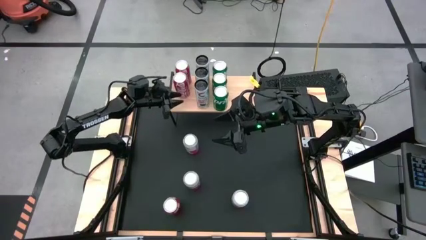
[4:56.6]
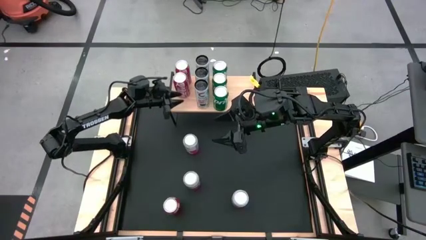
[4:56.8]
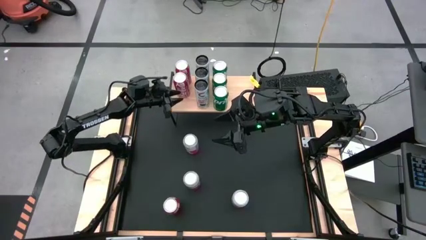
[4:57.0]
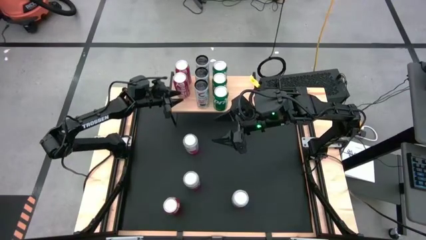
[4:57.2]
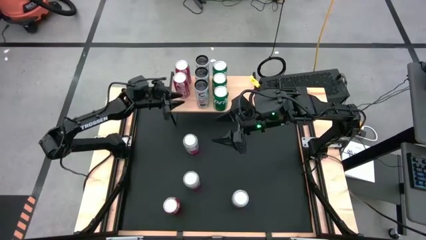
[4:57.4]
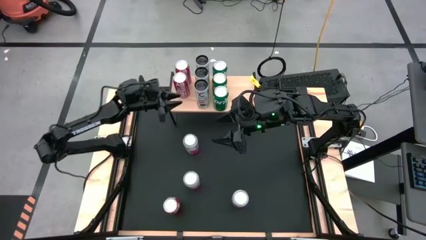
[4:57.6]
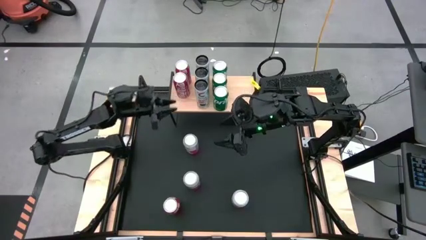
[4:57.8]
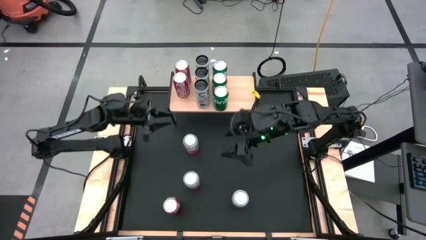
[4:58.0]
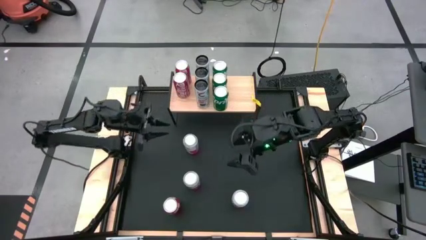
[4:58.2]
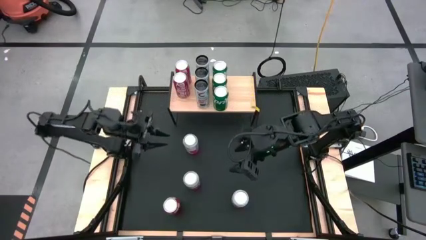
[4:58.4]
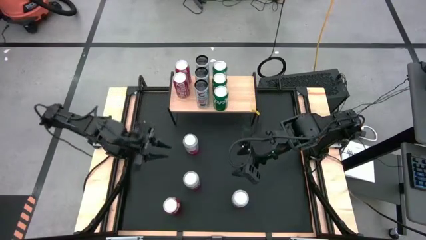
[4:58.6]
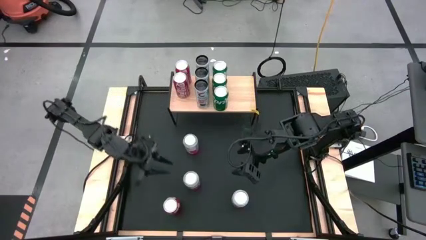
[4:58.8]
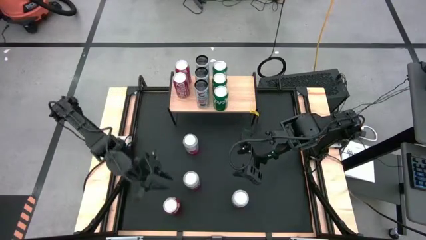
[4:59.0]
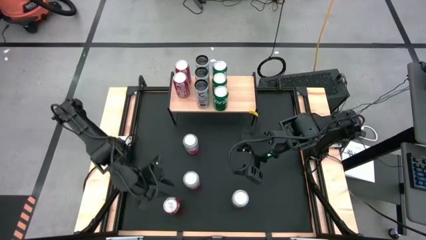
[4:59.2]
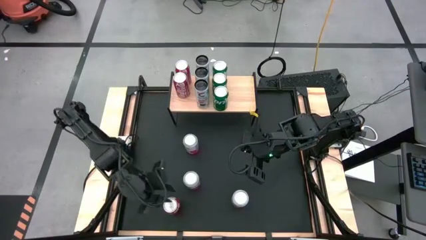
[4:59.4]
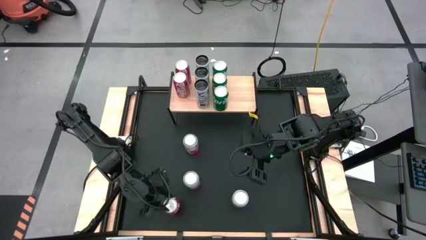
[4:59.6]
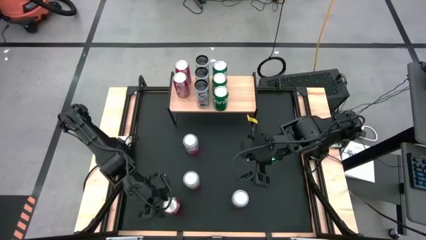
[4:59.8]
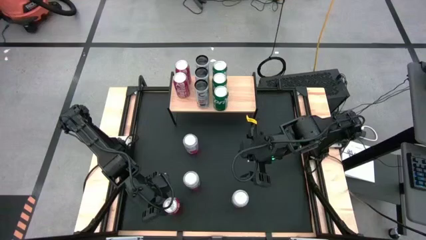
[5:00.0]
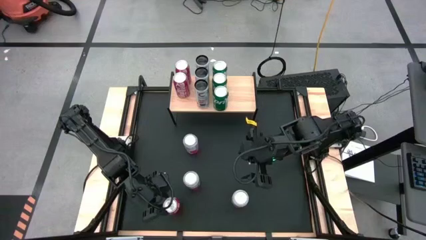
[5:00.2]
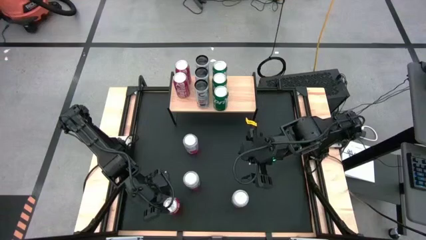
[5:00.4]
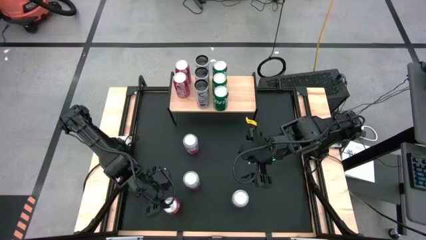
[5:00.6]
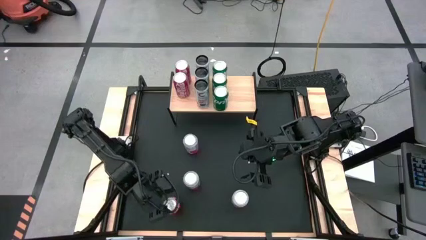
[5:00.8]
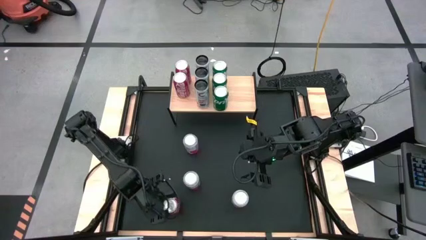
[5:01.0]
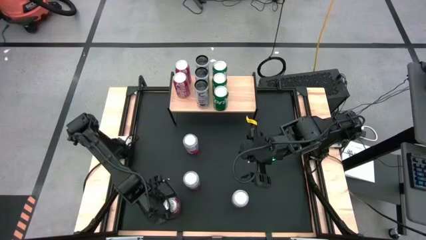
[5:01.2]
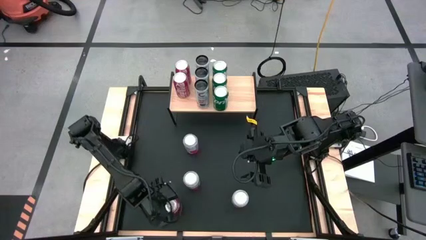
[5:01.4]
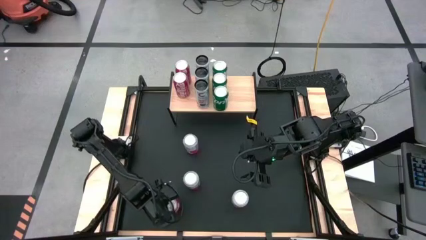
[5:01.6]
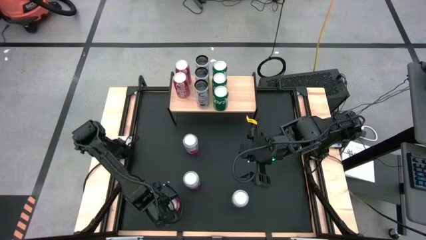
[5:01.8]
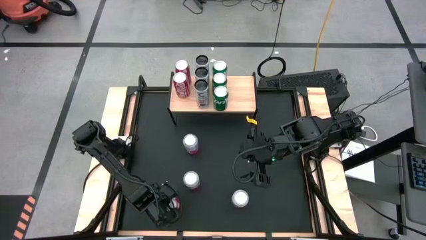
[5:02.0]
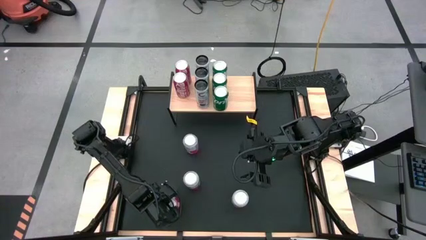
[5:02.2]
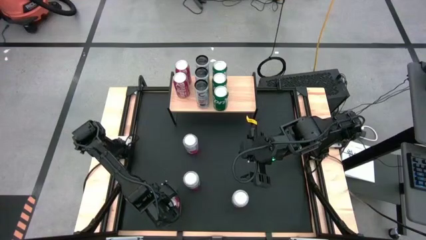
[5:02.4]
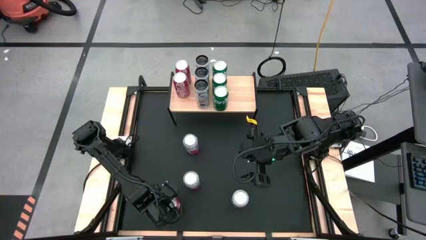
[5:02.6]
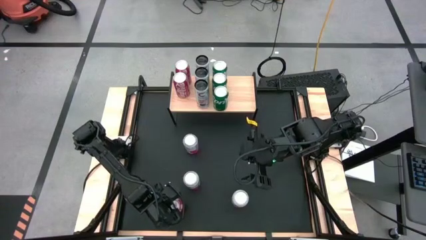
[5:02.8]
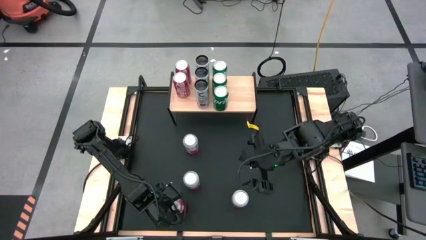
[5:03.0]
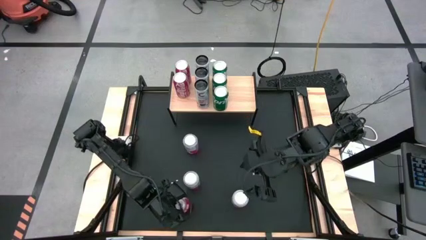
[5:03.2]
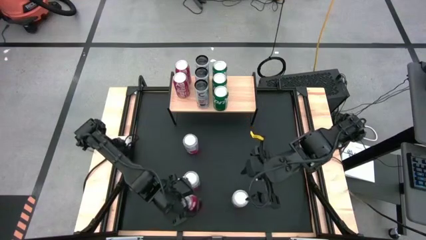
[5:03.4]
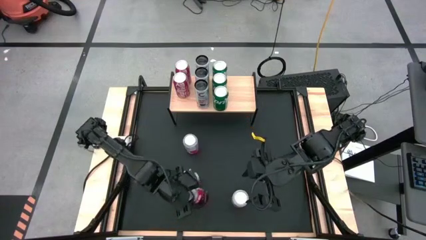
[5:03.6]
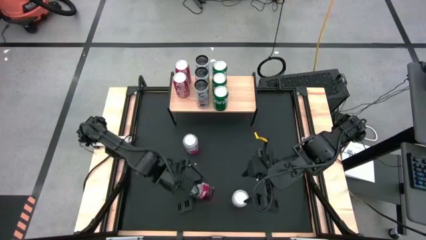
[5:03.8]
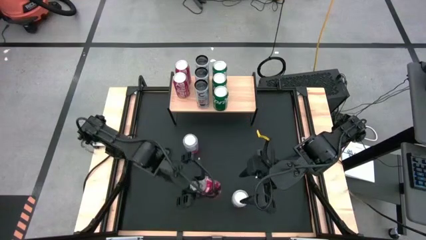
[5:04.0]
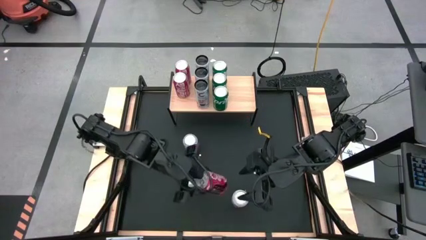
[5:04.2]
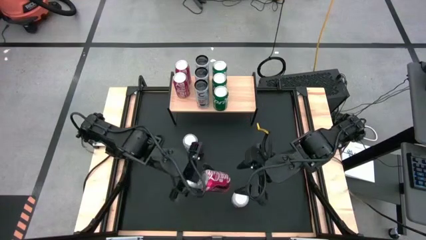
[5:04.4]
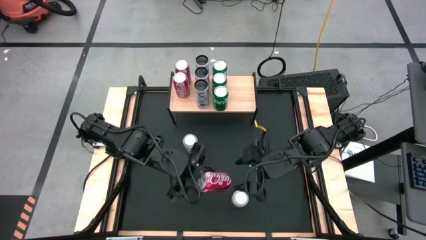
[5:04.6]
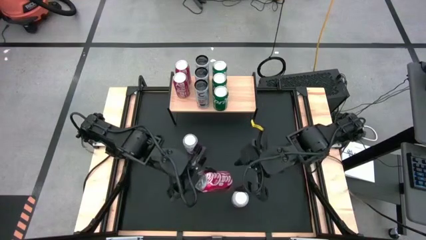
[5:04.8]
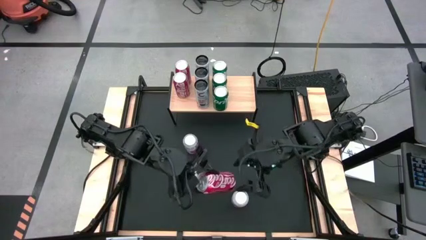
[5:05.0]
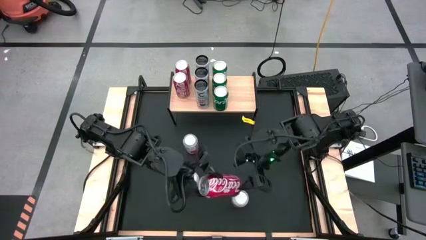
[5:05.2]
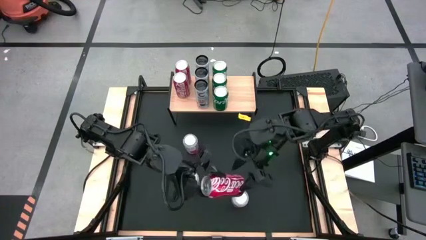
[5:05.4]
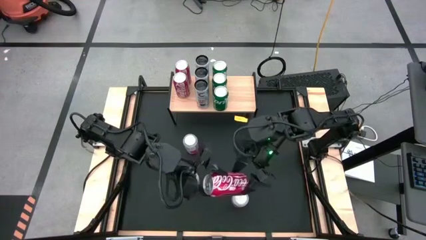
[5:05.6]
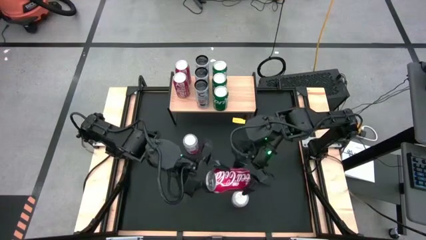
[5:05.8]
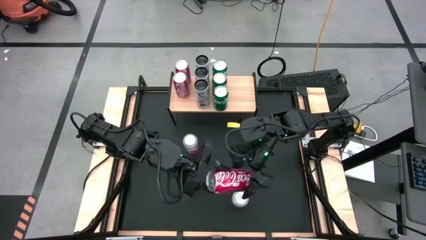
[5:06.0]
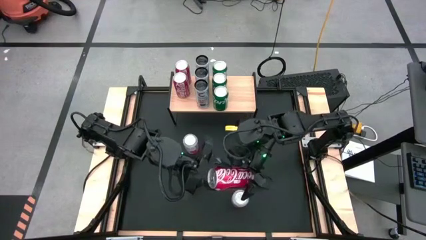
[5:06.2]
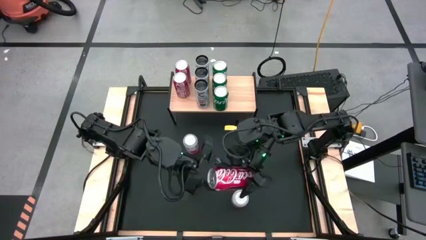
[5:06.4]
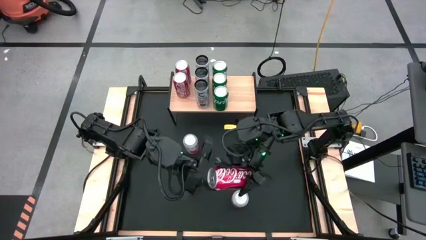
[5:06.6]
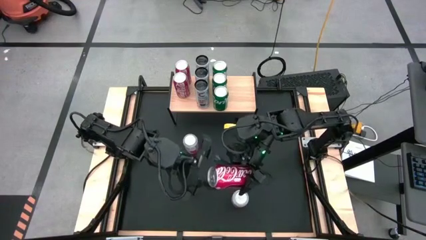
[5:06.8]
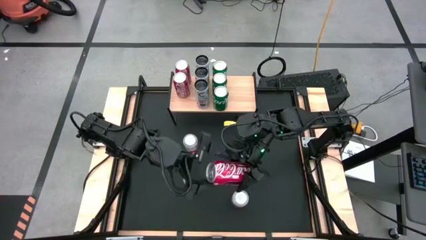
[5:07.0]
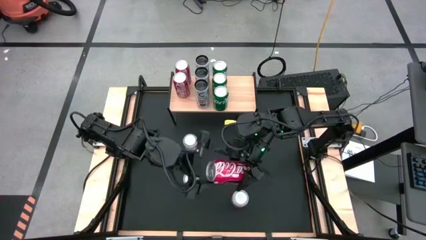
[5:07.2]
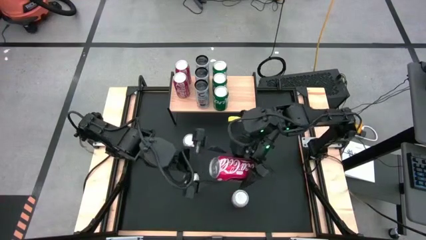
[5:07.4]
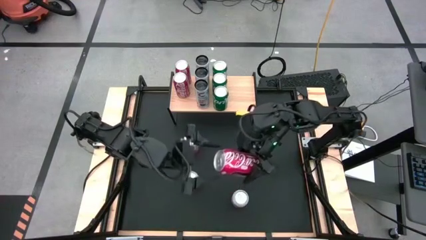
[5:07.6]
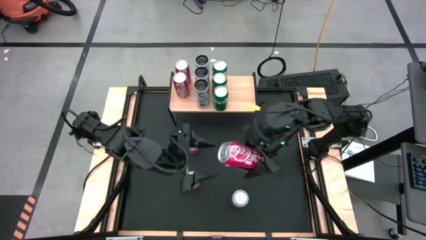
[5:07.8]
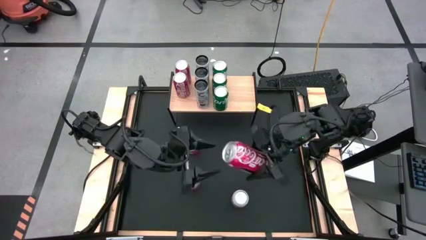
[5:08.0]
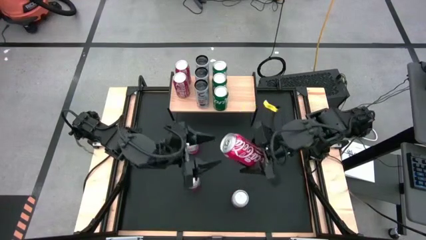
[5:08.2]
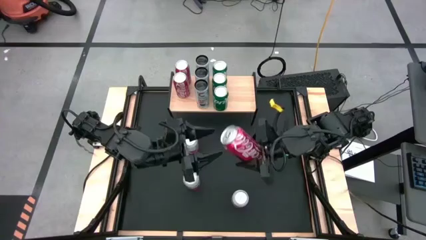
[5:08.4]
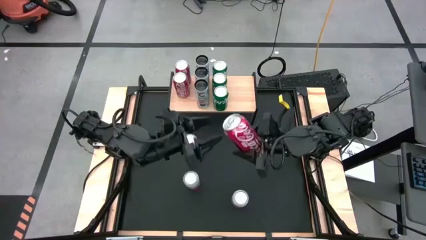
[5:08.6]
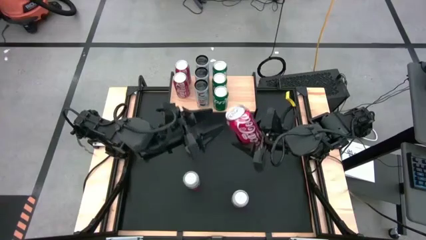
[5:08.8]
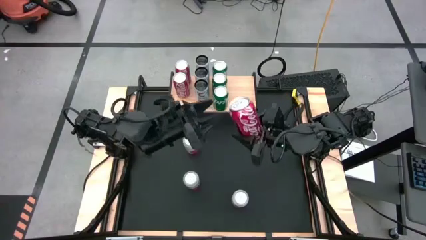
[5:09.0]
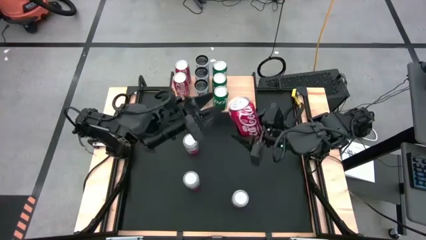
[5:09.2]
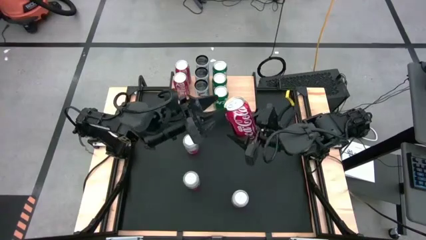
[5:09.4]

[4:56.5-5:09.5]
Task: Place canned beverage on shelf
Put the red white soda can aligned with the other red soda can on the shelf
